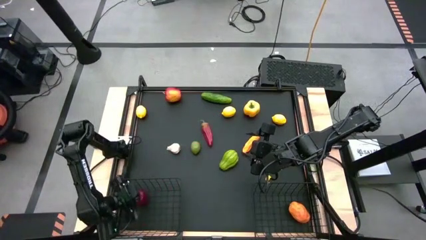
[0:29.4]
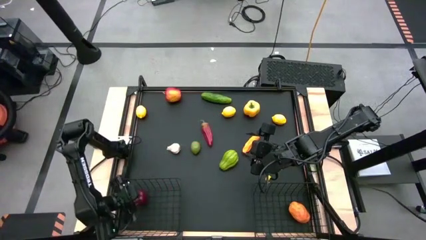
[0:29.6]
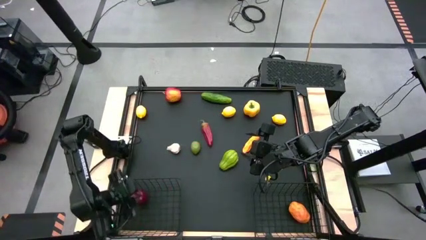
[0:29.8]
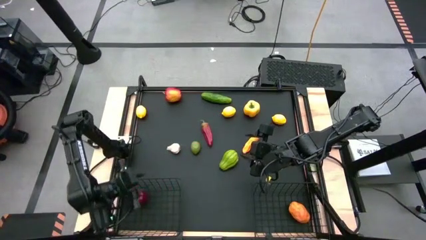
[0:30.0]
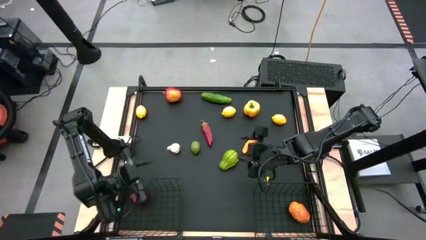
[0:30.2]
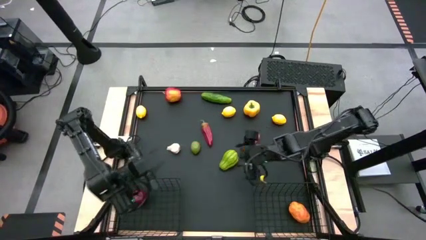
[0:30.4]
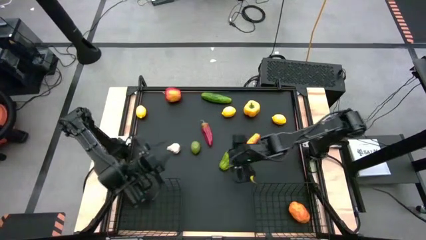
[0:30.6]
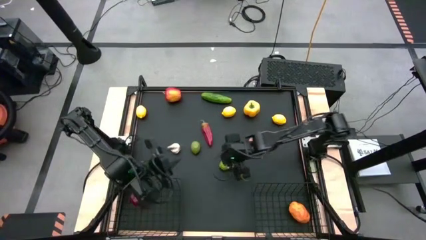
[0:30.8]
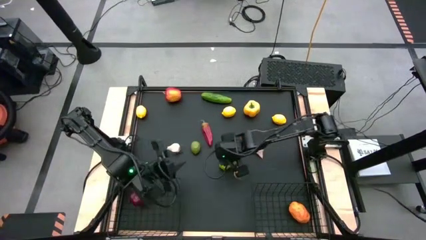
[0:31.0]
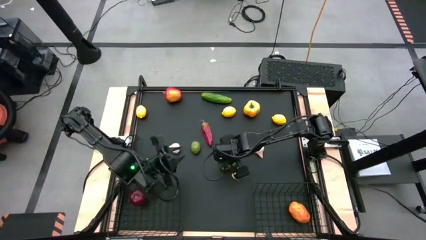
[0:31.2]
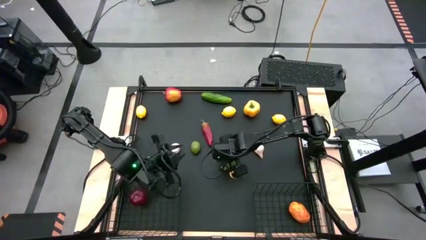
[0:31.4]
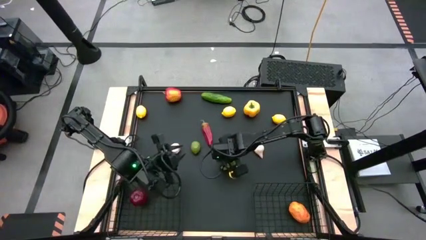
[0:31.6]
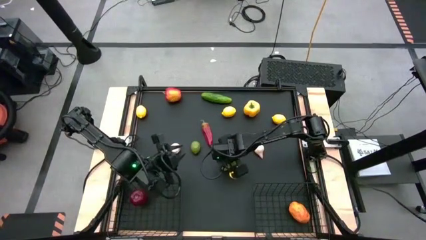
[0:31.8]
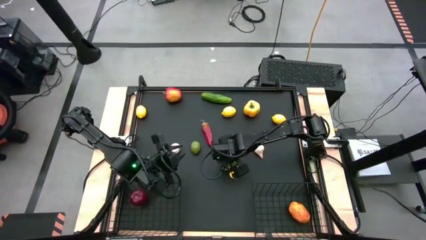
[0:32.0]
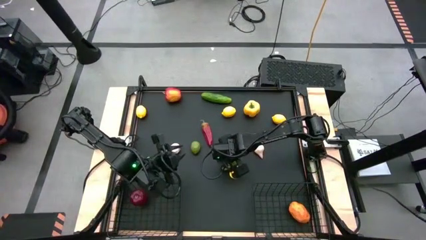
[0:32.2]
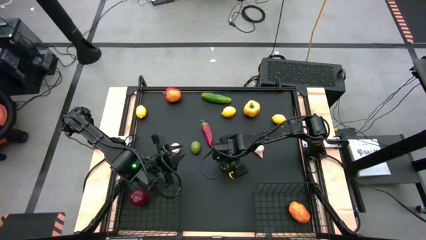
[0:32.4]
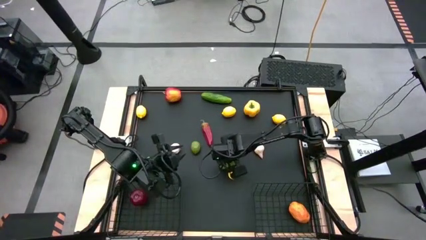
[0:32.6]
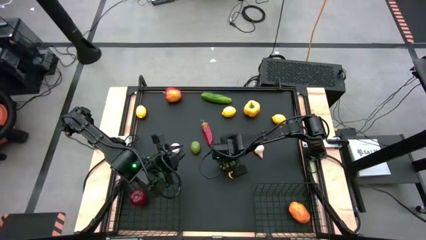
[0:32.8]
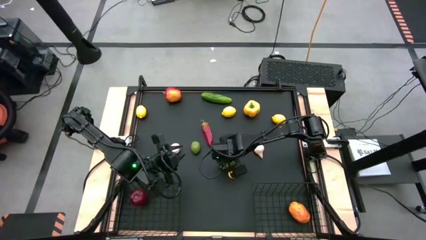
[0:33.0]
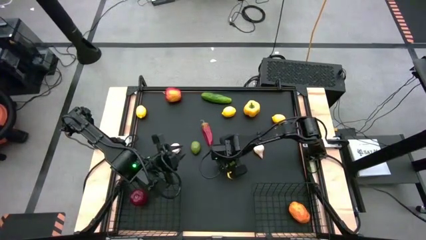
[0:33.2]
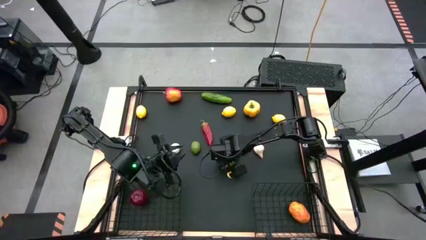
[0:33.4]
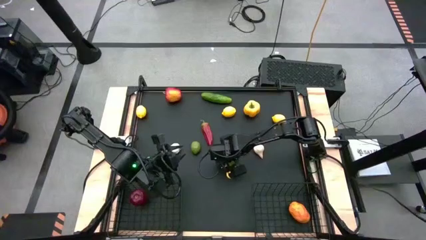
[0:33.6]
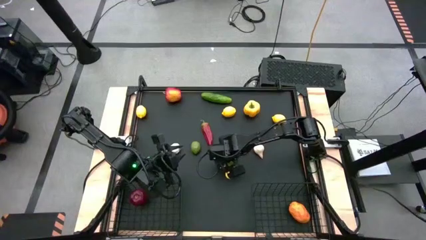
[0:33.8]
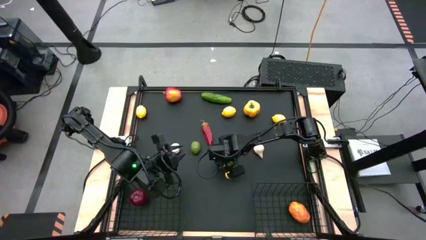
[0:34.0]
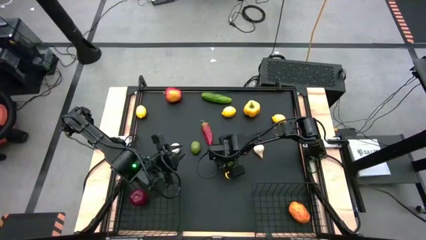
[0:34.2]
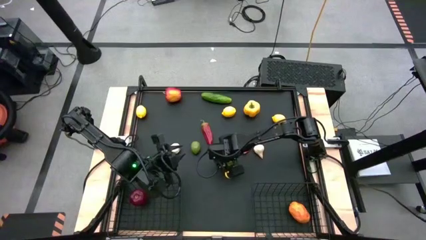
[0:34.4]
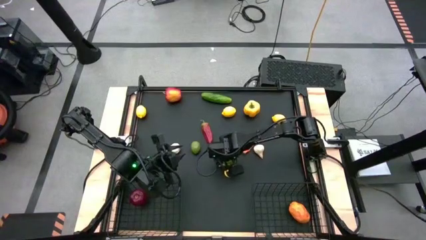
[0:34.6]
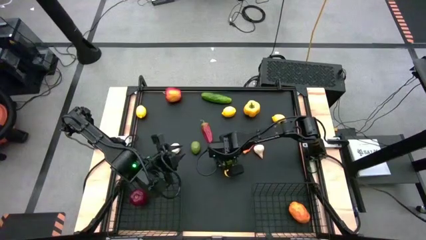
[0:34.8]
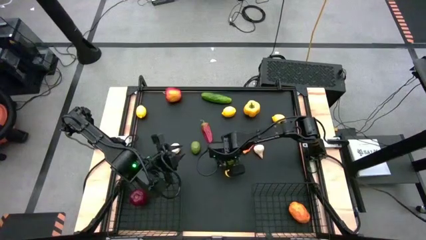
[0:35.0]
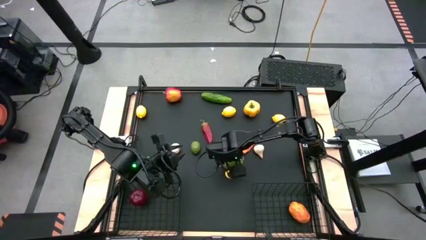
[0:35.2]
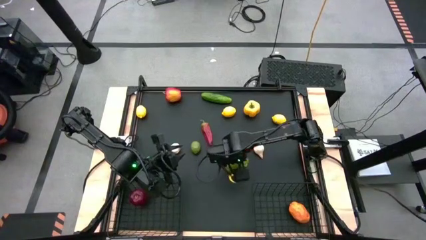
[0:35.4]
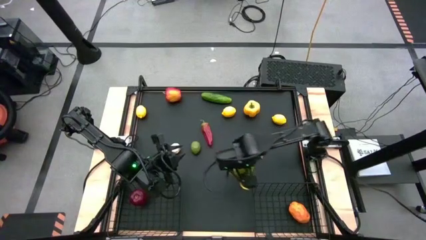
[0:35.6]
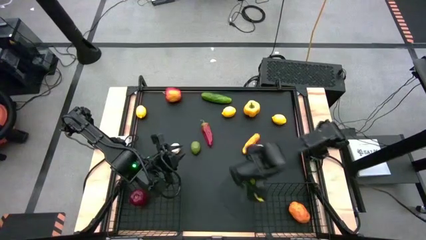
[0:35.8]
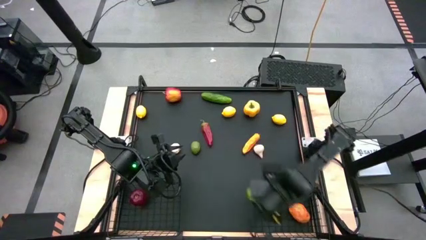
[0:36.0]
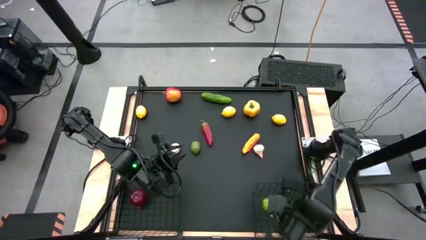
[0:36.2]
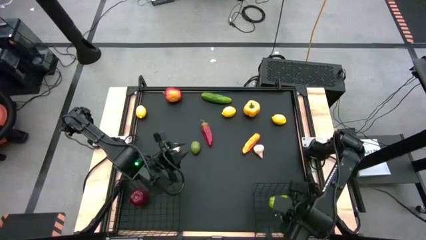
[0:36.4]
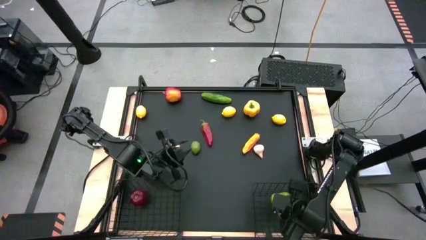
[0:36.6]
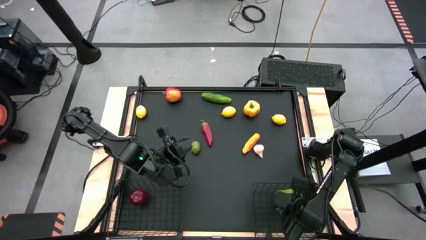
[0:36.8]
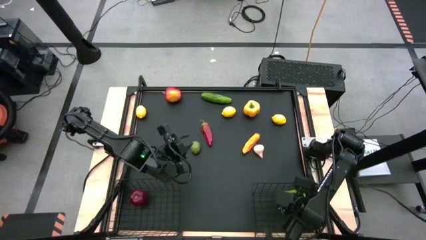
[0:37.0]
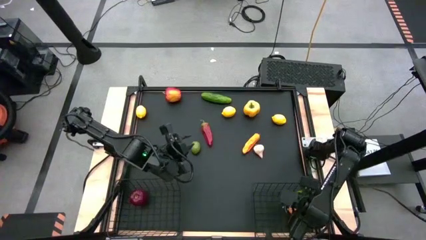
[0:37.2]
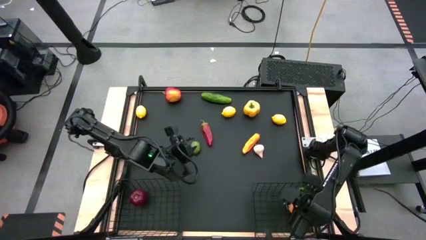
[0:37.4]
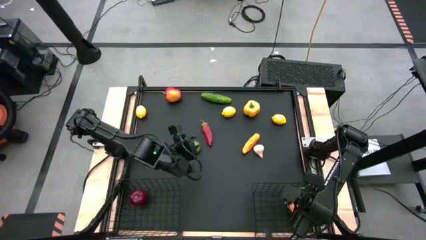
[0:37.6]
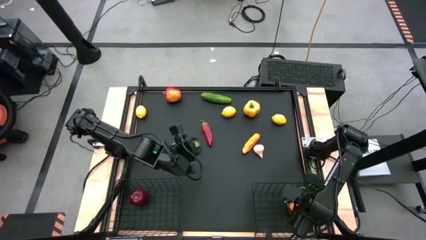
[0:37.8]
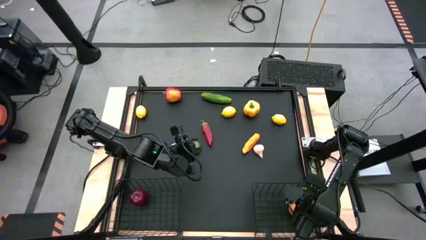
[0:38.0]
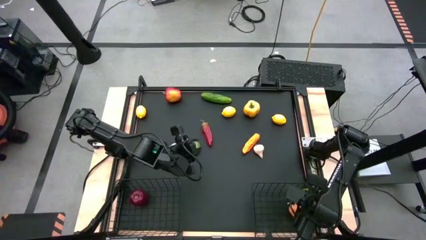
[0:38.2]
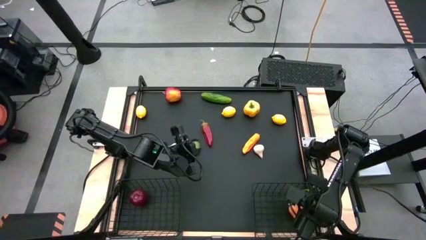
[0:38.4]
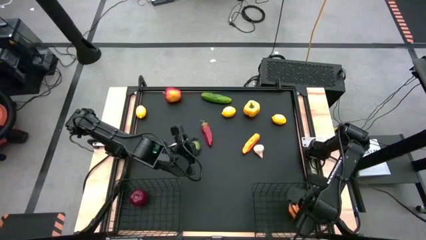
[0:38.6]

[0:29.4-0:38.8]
Task: Sort produce into baskets
Put the green chayote into the right wire basket

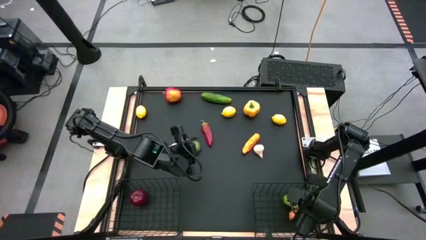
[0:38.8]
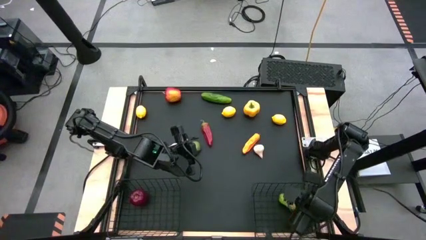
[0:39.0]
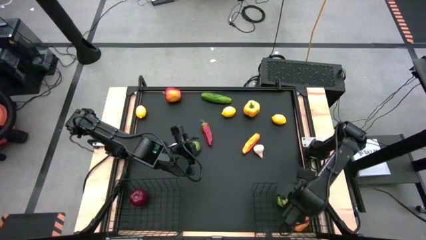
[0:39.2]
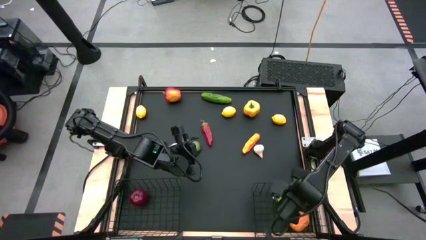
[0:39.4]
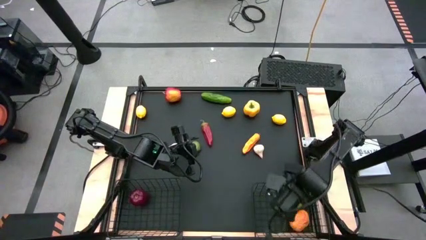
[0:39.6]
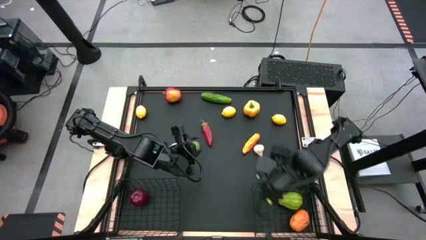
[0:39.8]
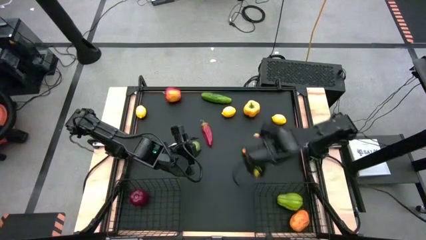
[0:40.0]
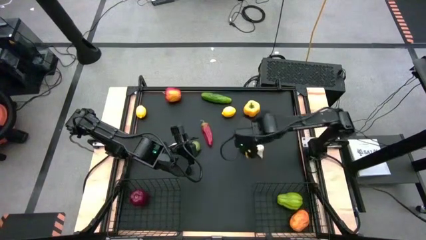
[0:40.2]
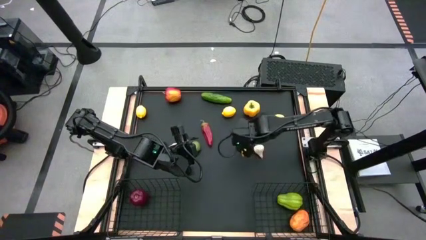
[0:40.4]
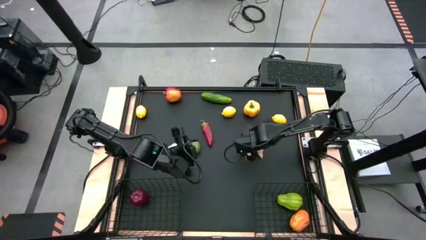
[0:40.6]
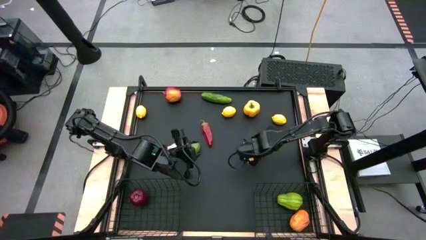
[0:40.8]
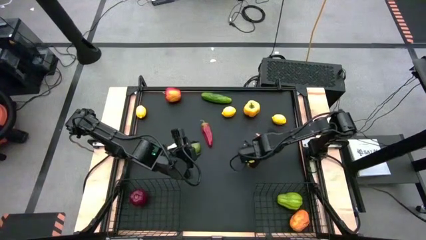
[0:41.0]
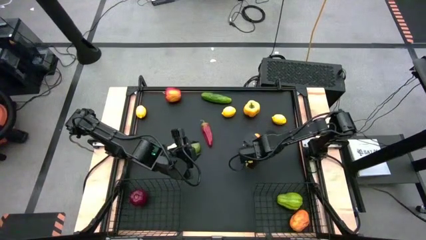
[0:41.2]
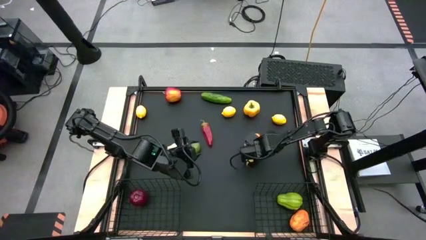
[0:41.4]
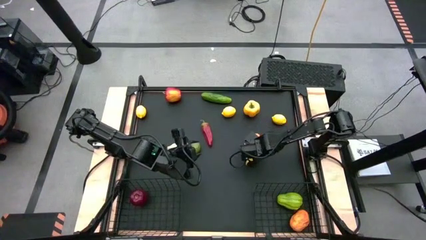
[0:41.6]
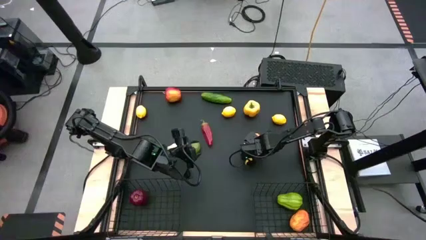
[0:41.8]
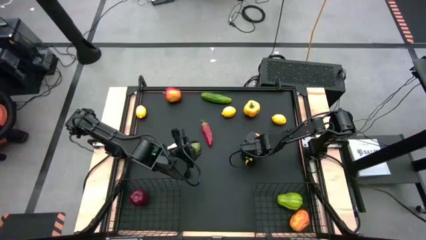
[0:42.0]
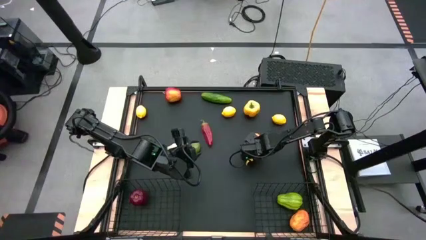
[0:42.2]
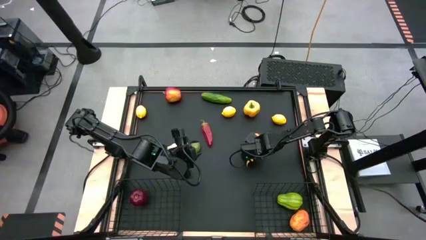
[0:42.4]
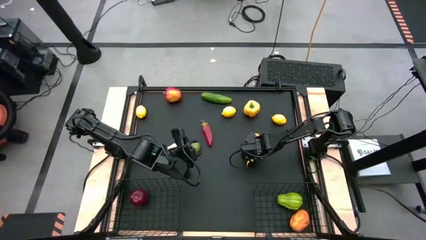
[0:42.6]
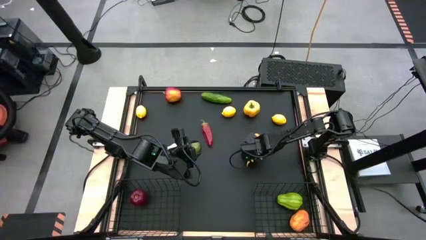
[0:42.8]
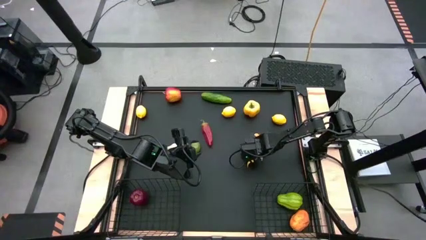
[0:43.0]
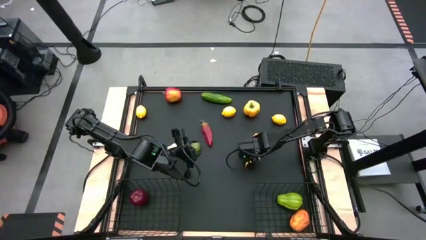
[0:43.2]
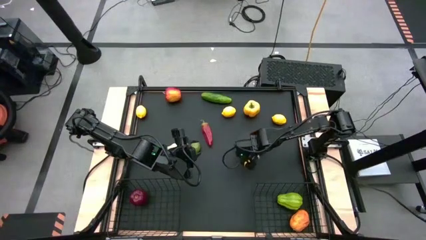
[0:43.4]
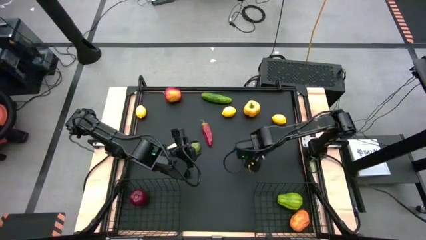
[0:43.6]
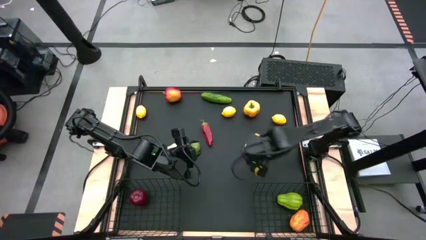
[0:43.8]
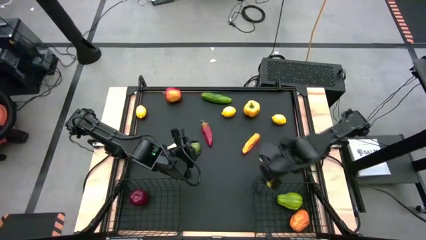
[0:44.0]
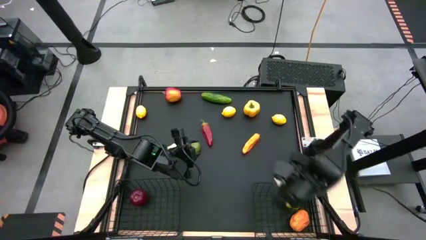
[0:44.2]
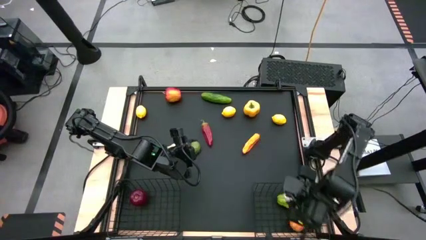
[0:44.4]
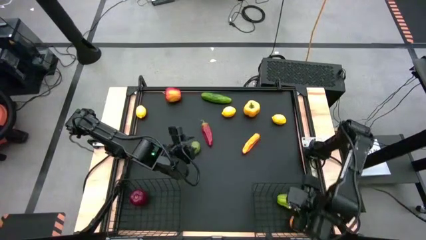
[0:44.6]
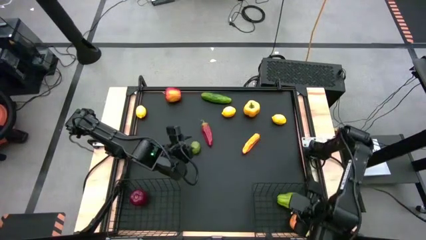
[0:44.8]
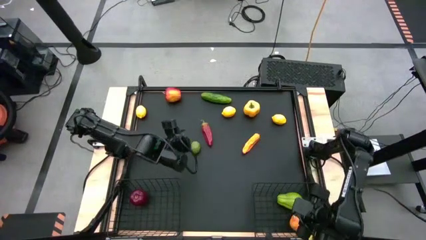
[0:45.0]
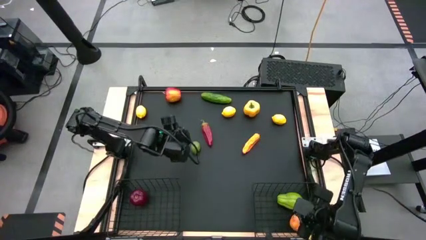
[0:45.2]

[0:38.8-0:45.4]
Put the right white garlic into the right wire basket

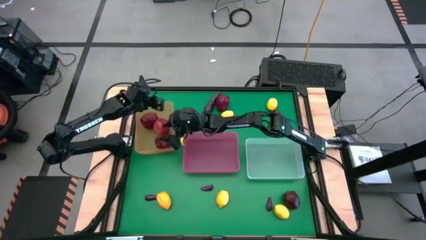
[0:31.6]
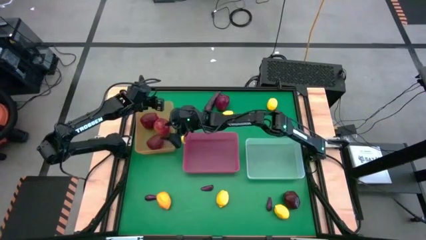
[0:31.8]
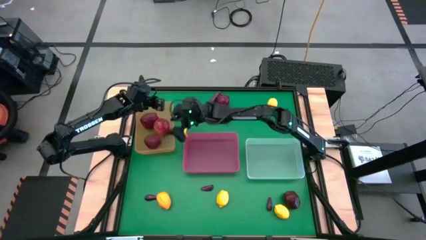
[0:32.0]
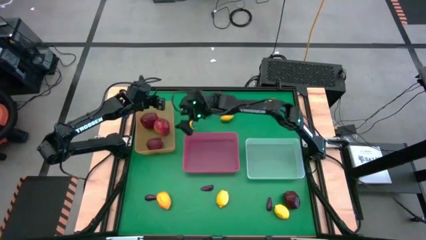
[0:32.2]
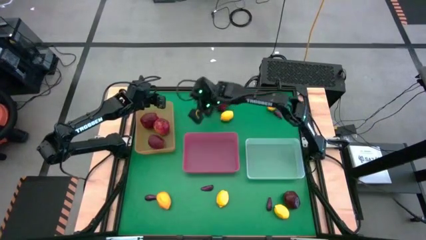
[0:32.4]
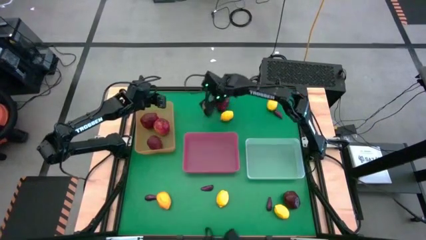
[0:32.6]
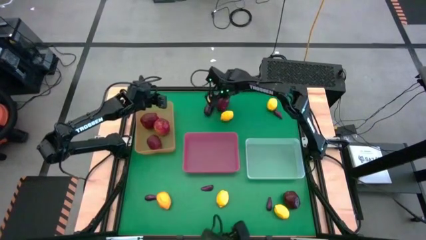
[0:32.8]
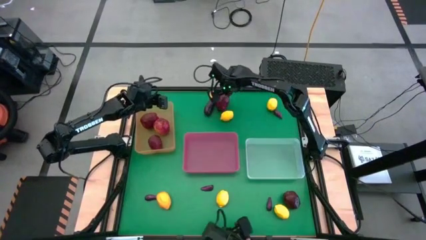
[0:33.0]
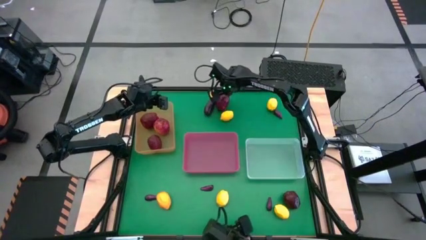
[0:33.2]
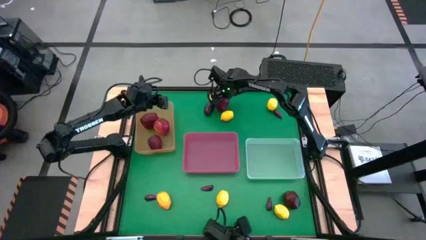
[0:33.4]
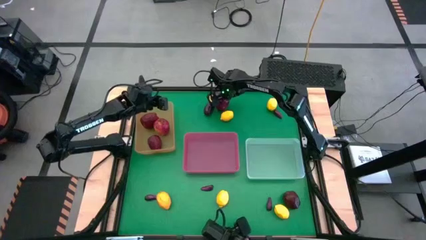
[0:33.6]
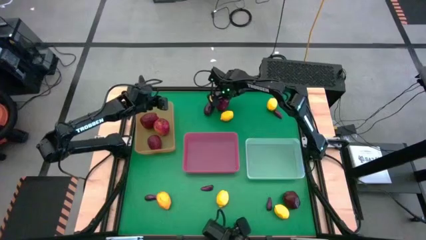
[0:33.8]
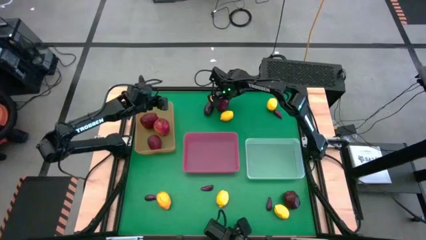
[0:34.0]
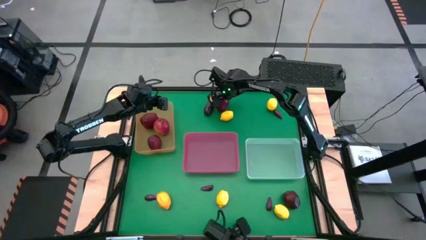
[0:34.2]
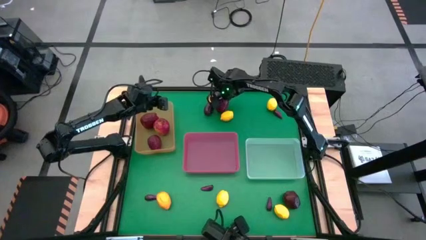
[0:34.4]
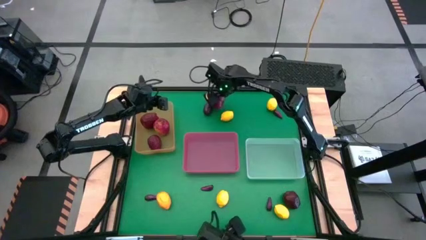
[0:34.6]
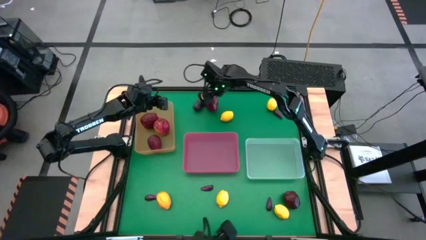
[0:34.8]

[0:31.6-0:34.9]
Task: Sort produce into baskets
Put the red apple into the orange bin
